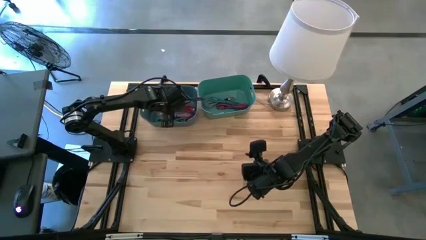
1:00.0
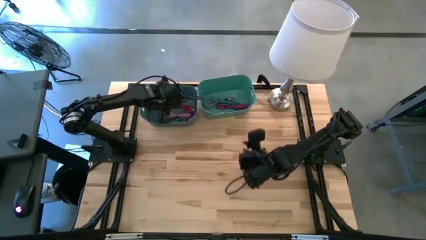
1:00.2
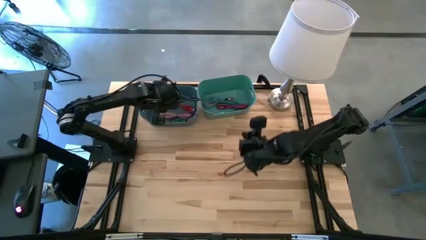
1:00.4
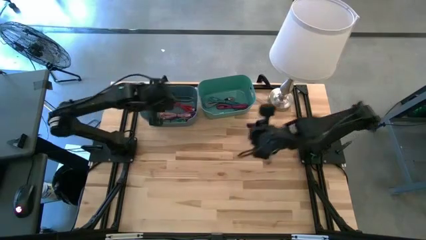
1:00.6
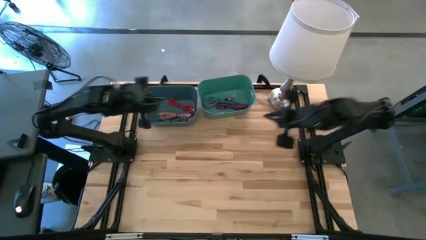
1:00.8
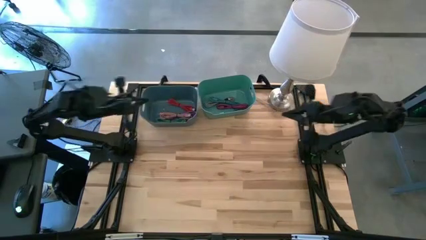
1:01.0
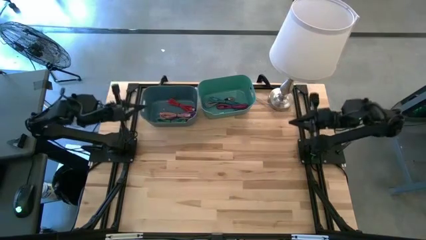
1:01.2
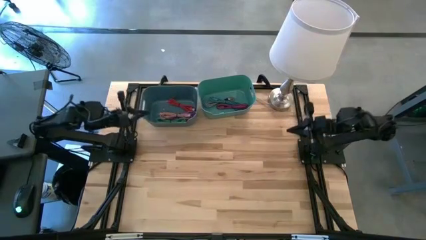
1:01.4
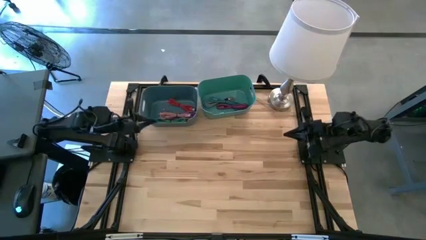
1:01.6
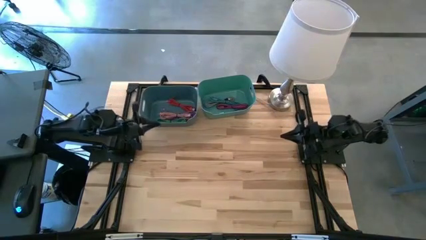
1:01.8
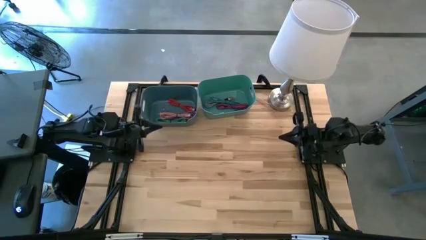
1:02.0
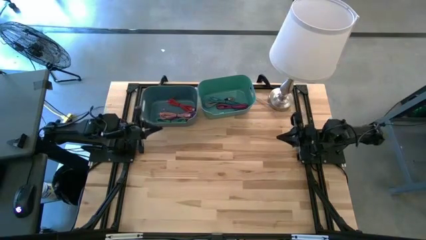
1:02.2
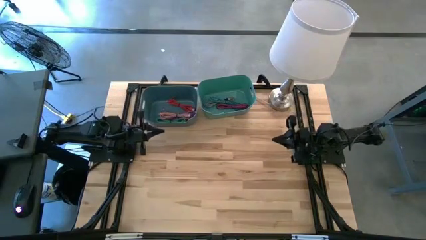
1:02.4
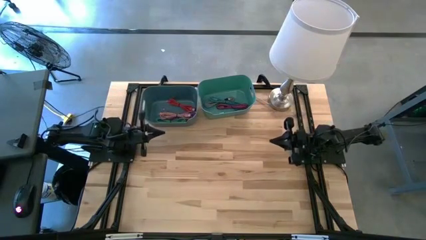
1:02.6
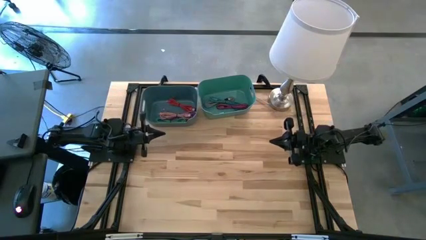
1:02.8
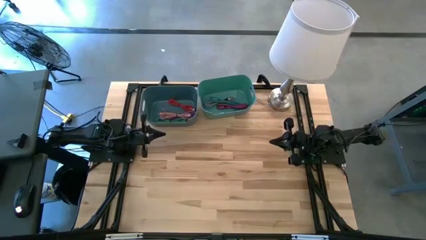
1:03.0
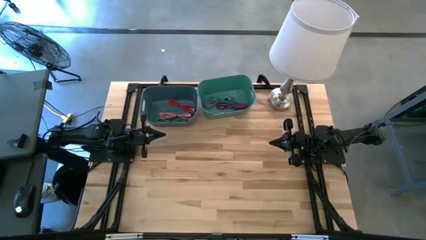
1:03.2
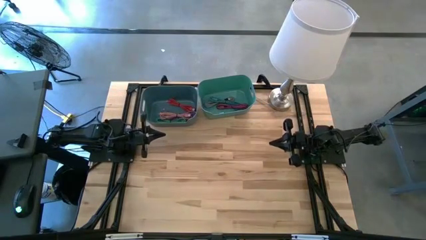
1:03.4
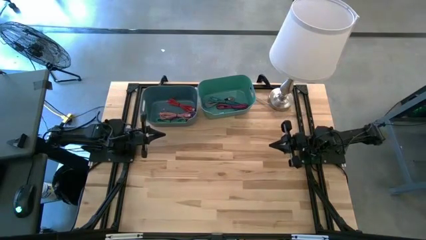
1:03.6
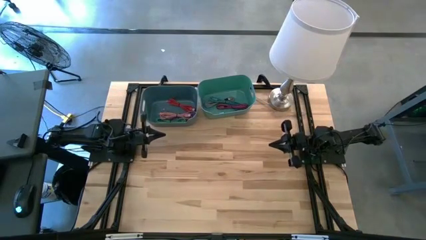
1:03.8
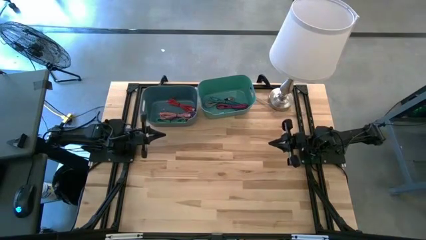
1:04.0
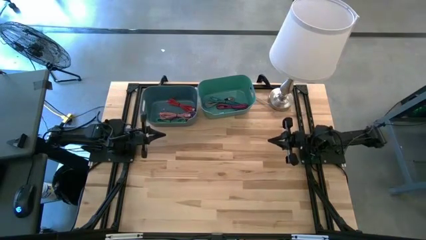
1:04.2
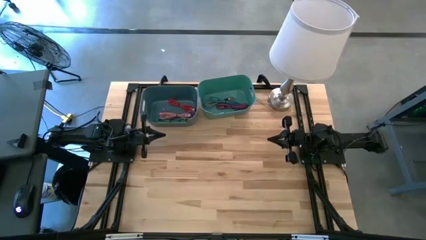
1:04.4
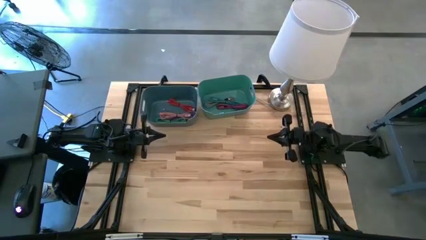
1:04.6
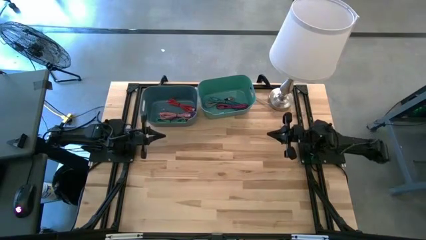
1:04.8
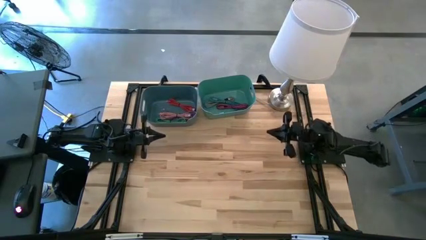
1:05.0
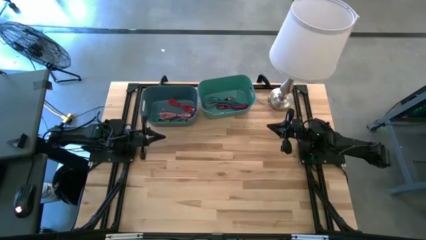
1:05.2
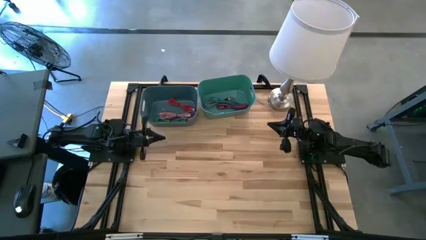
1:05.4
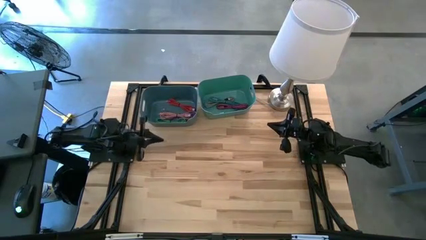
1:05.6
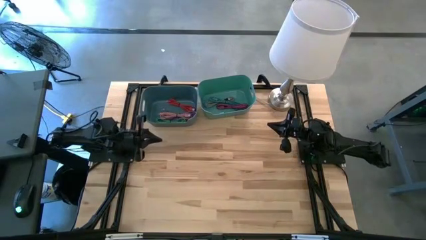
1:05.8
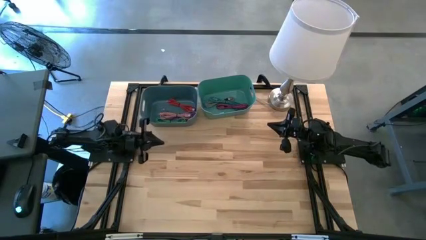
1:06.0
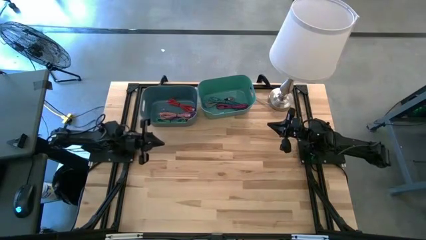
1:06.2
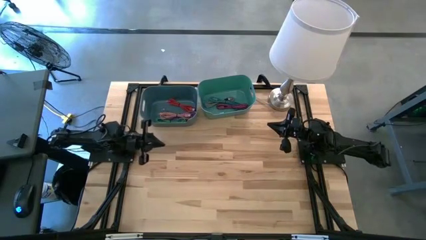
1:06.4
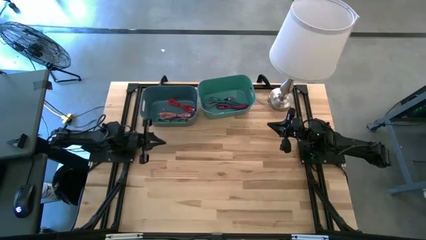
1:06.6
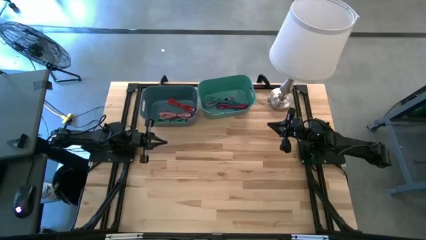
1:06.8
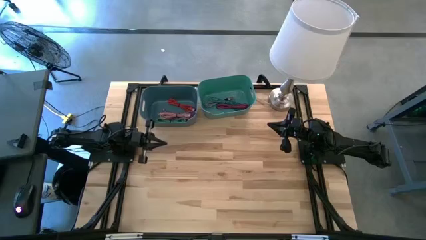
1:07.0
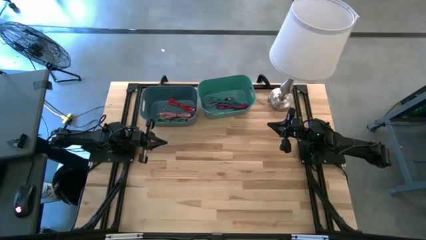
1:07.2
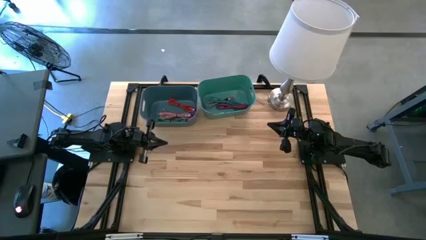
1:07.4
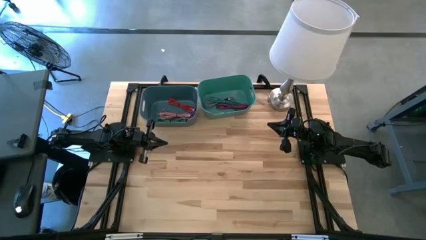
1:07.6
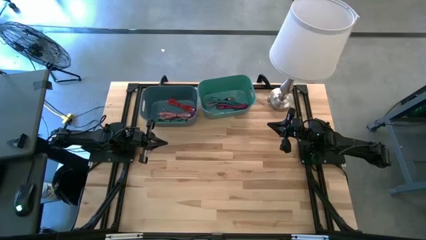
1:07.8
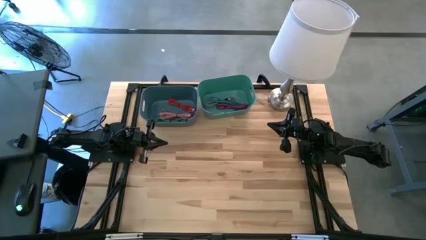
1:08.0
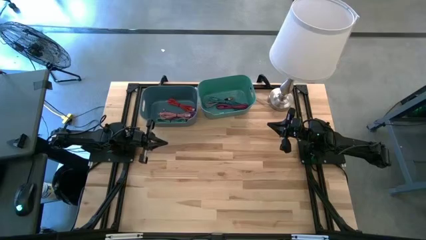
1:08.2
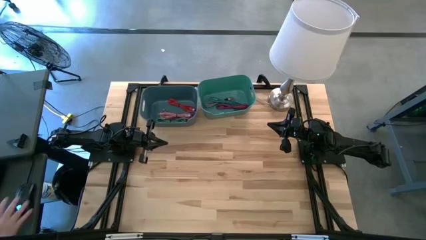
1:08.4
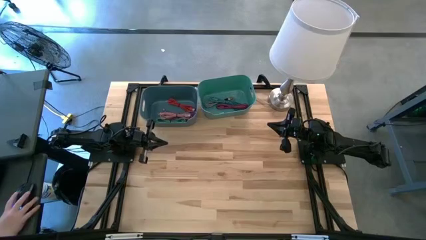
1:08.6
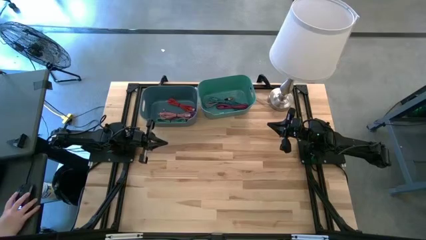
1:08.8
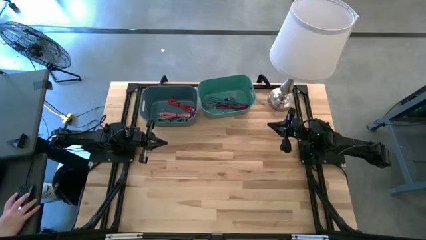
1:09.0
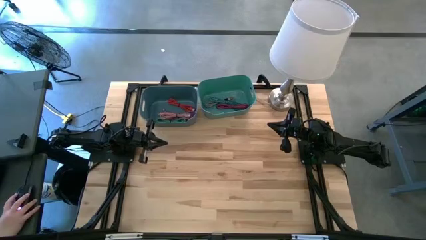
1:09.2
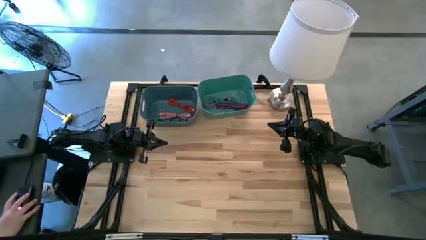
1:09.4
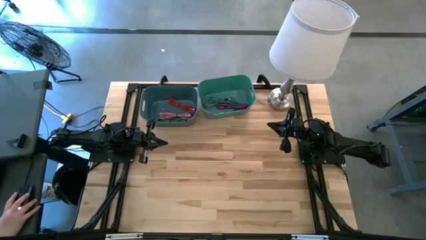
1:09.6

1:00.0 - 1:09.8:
Task: Pick & Place USB Port
Return to Home Position

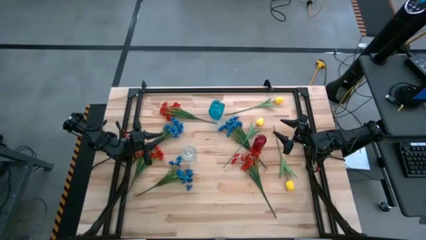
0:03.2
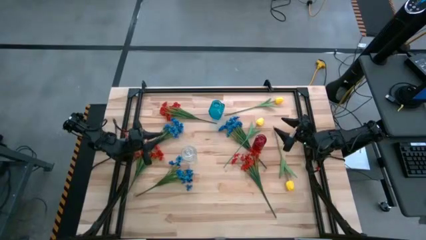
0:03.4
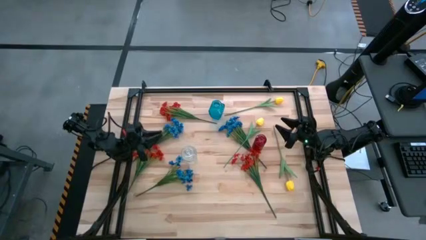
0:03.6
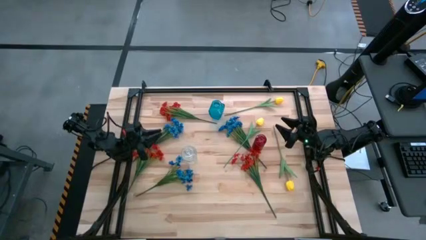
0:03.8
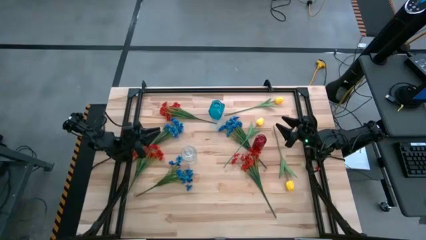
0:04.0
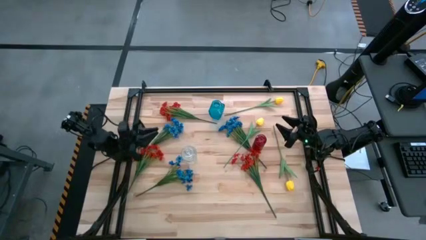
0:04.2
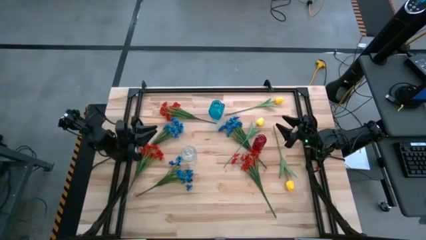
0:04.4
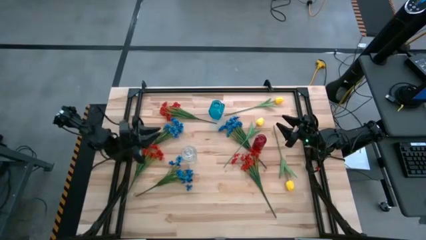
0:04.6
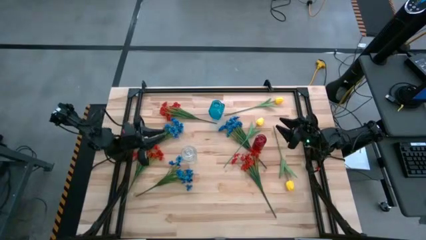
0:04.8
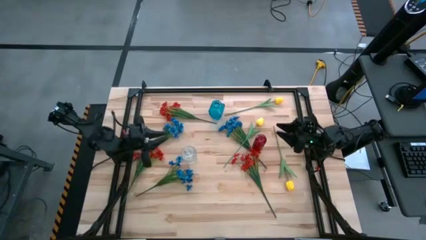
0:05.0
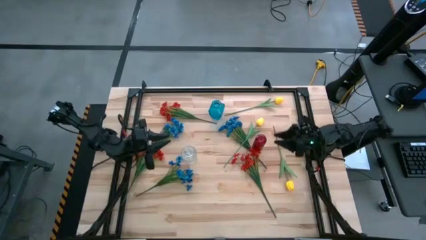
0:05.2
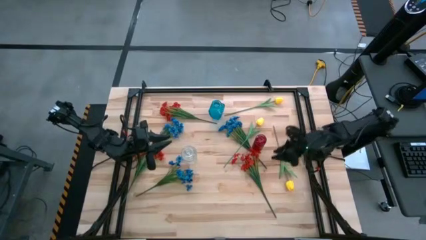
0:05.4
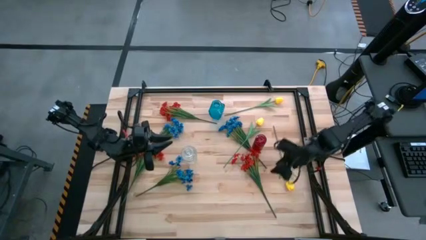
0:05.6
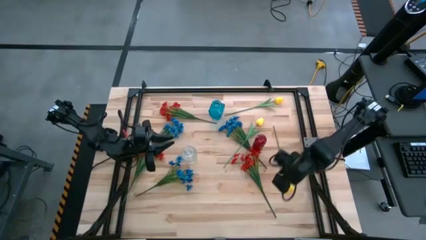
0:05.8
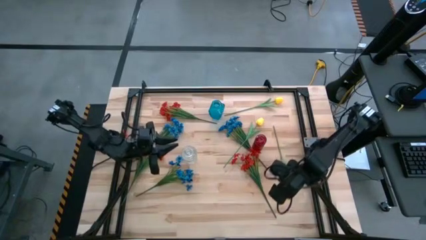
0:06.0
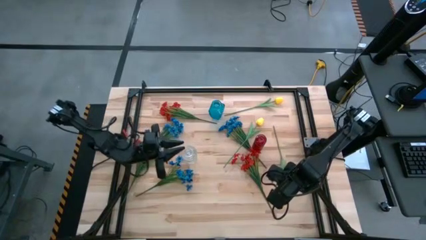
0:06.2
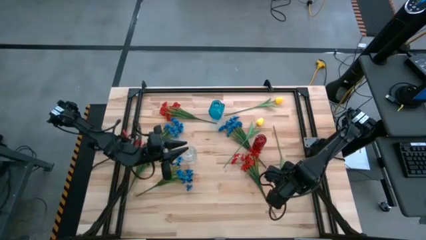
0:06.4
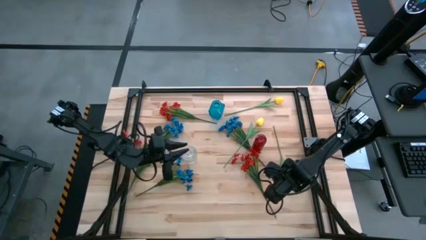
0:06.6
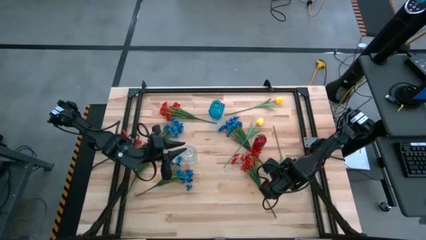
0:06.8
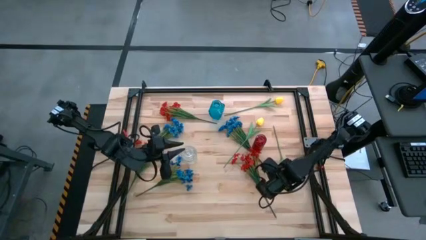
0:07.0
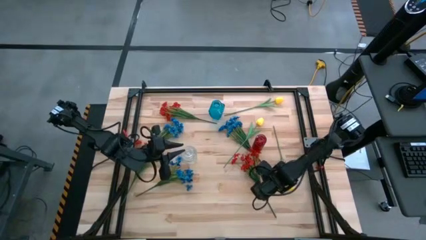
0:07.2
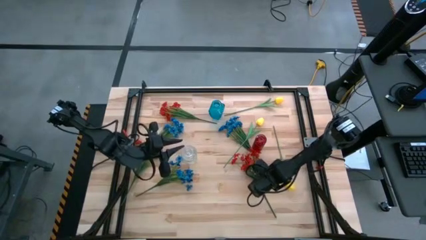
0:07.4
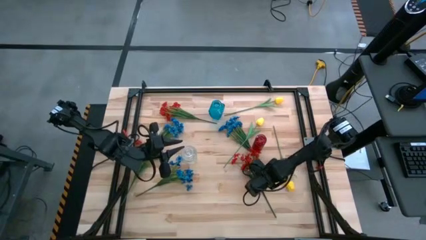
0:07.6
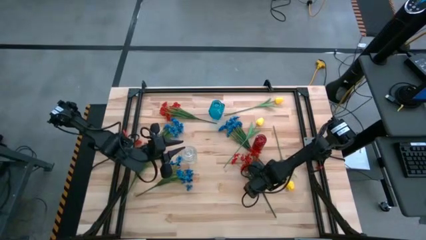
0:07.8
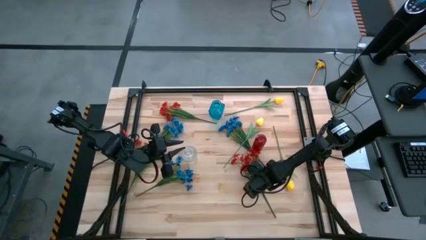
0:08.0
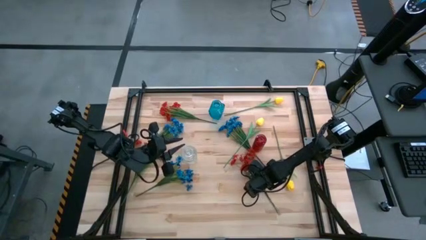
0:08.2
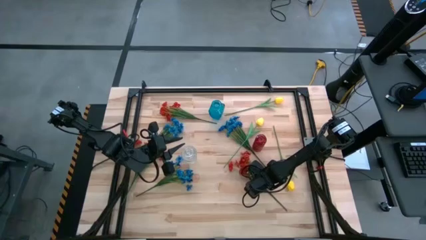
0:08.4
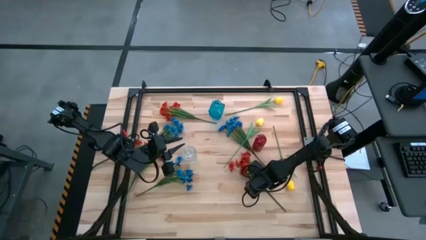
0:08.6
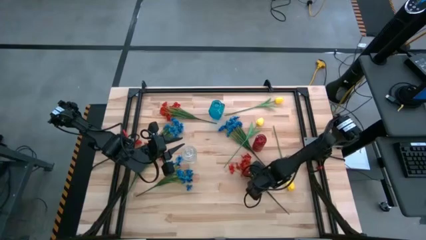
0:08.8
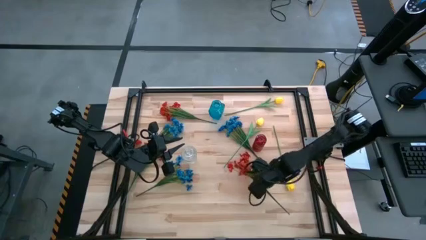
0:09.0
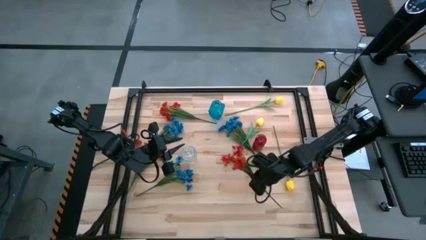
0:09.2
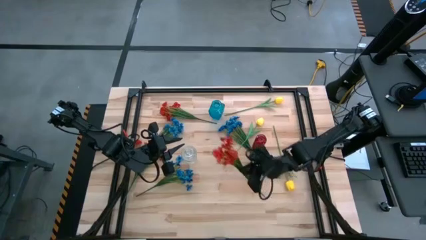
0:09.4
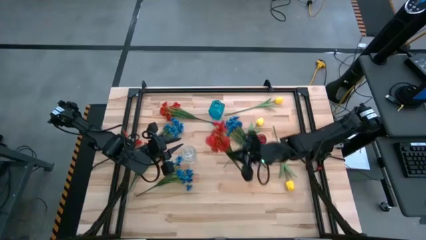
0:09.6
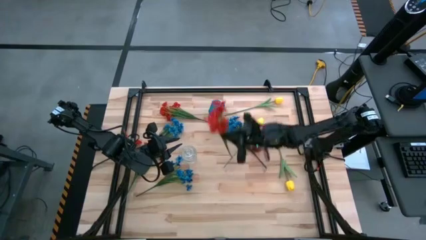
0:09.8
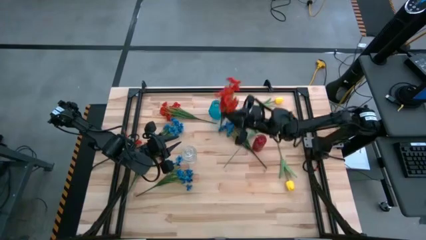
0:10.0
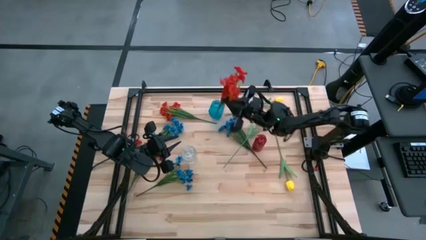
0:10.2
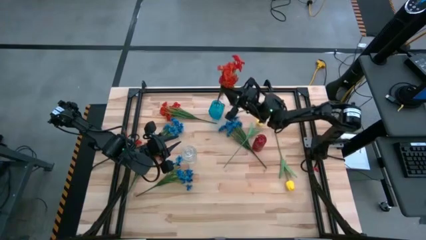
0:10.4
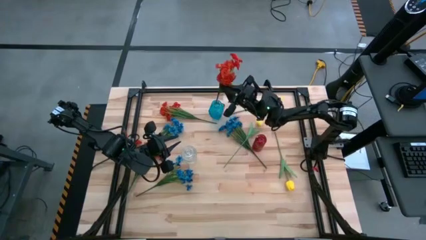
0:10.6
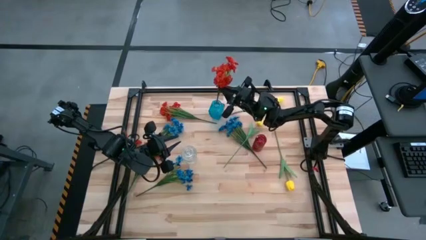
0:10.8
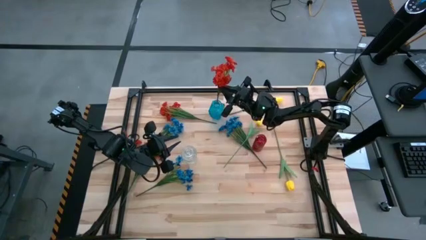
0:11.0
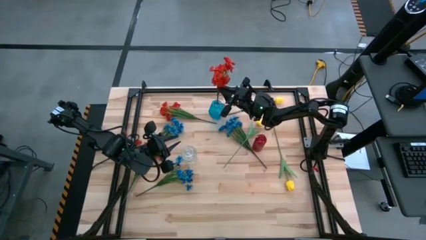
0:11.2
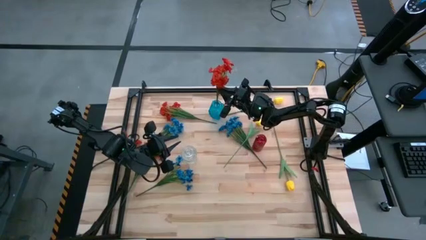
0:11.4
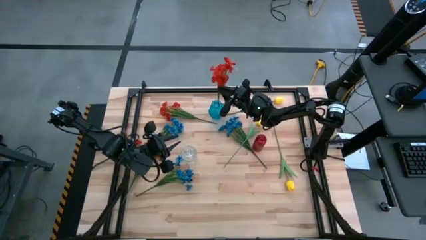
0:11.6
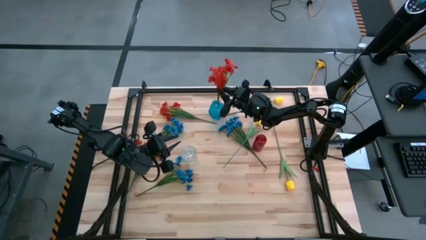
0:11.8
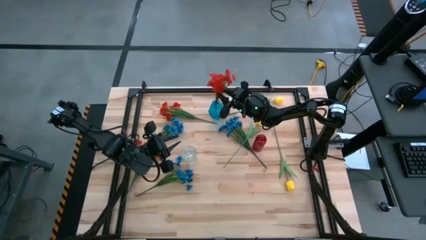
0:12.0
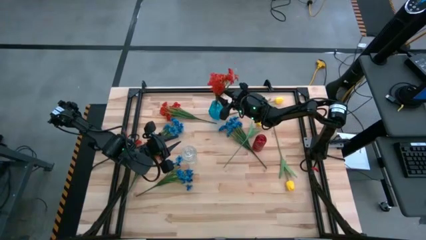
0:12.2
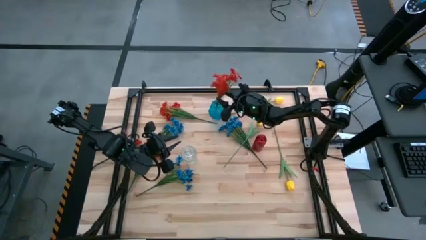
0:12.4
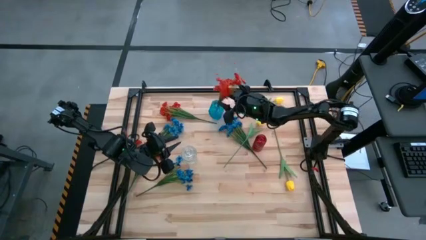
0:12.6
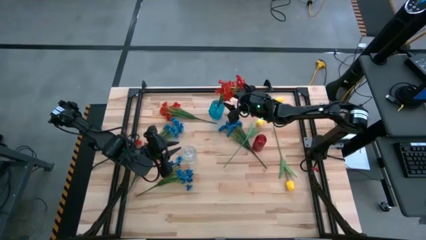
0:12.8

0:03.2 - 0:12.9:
Task: Sort flowers into vase by color
Put the bottom right red flowers into the blue vase
